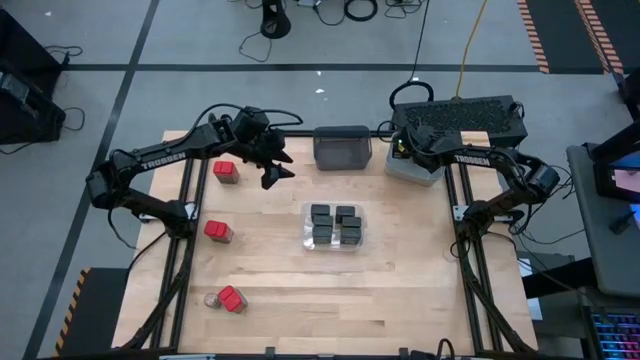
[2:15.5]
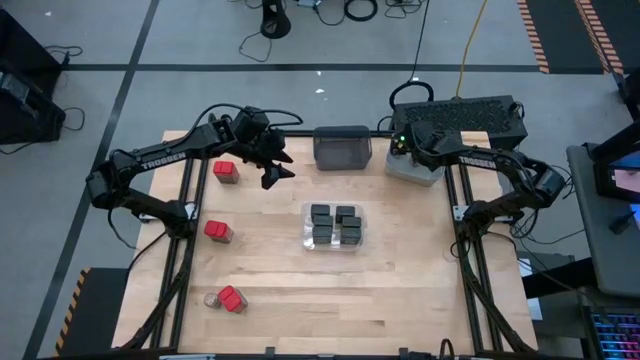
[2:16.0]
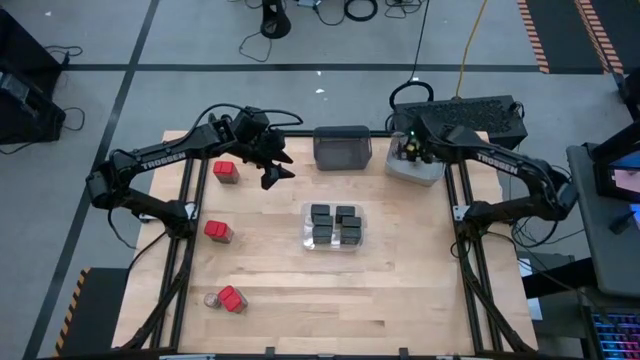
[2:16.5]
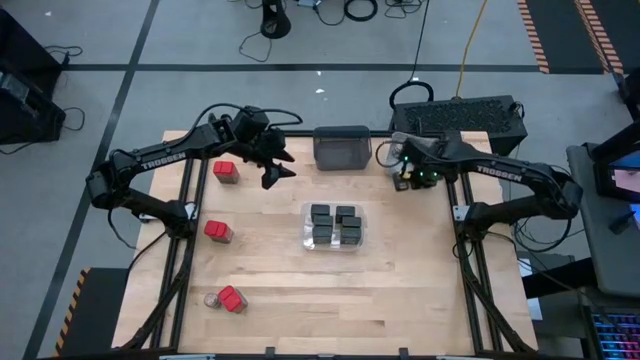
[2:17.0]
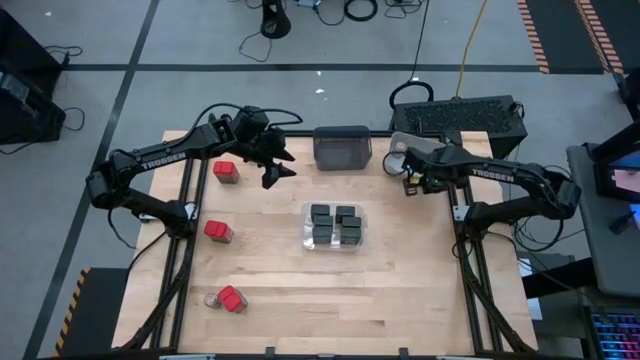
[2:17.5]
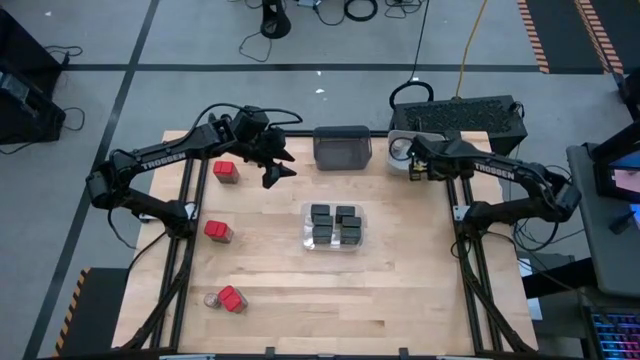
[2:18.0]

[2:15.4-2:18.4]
Task: Sort spices by type
Adjust the gray bin

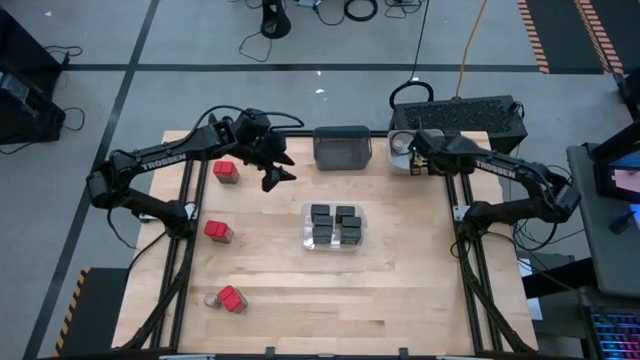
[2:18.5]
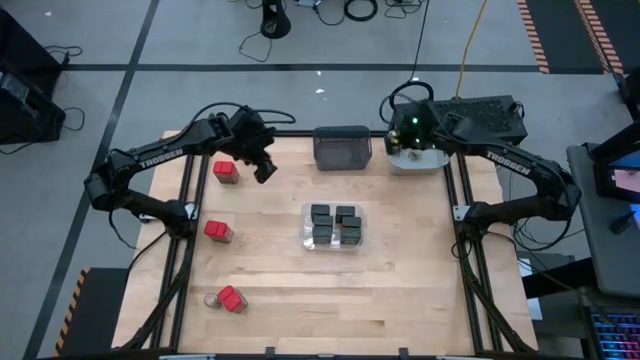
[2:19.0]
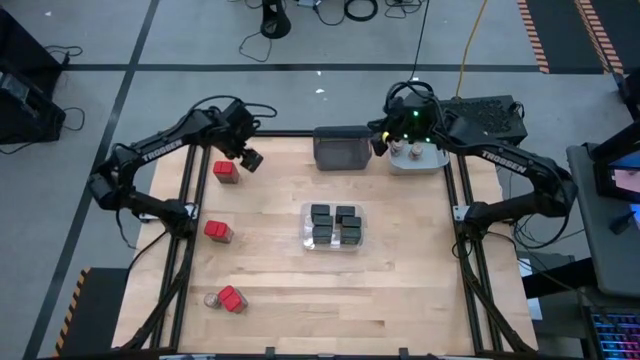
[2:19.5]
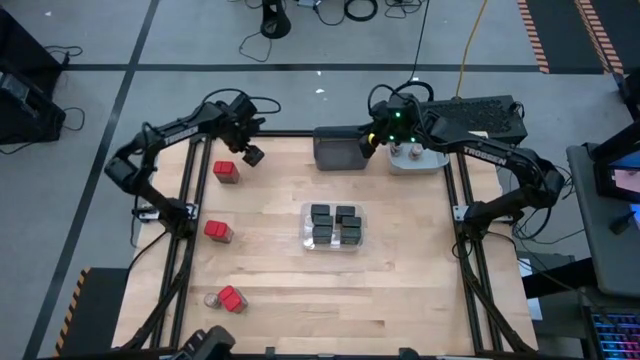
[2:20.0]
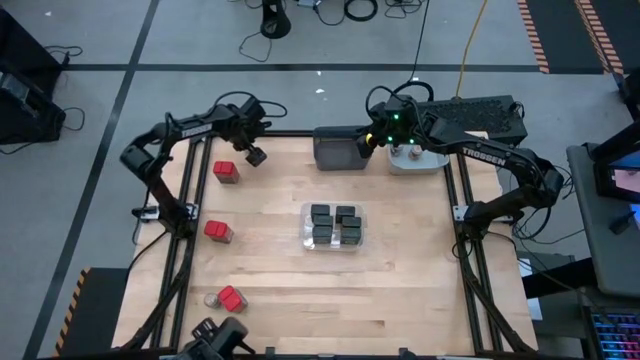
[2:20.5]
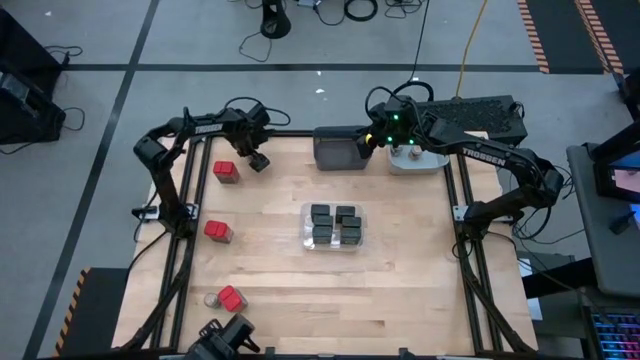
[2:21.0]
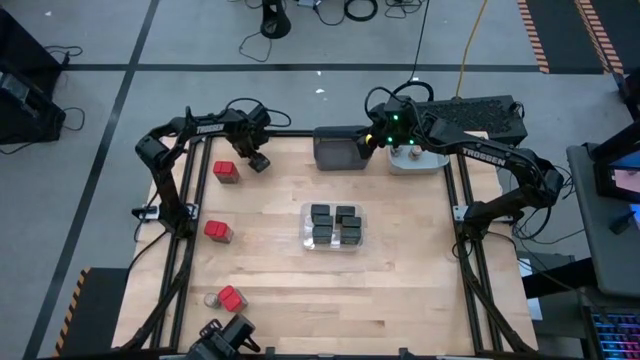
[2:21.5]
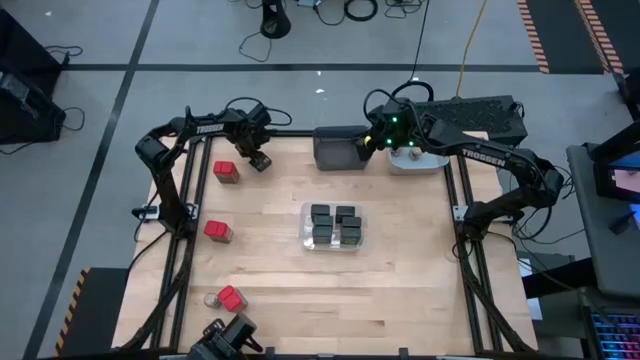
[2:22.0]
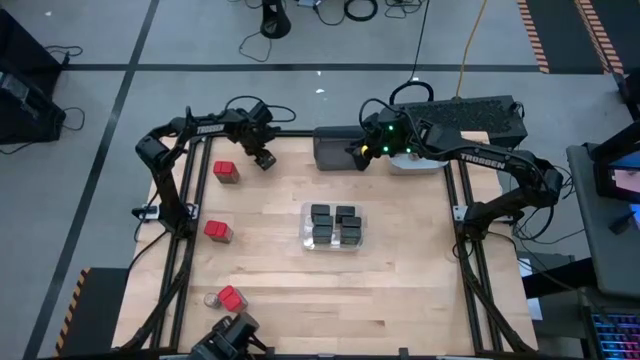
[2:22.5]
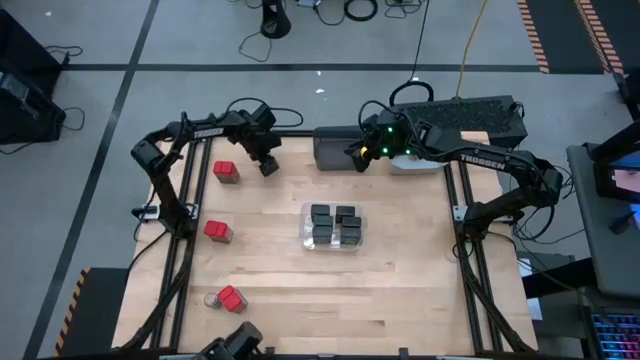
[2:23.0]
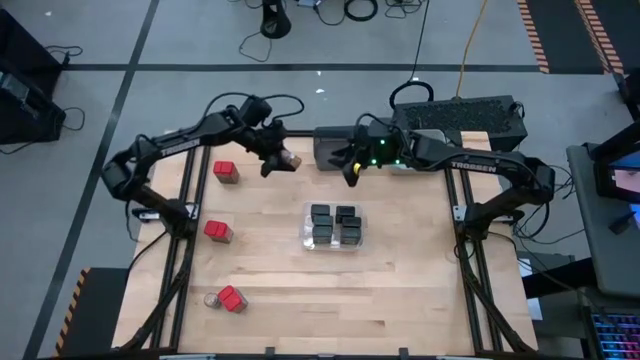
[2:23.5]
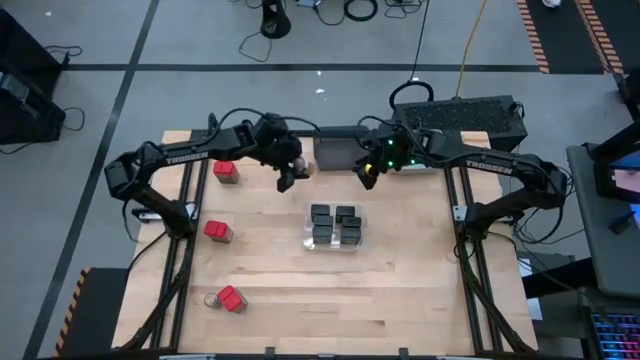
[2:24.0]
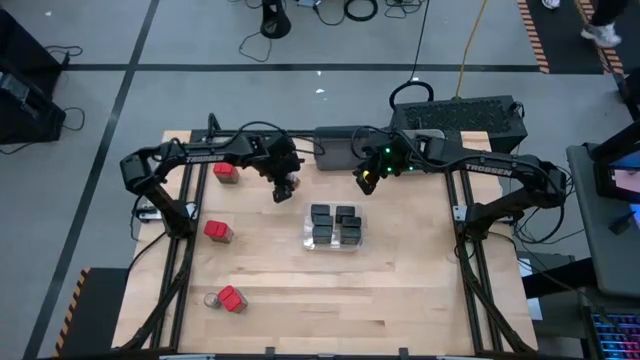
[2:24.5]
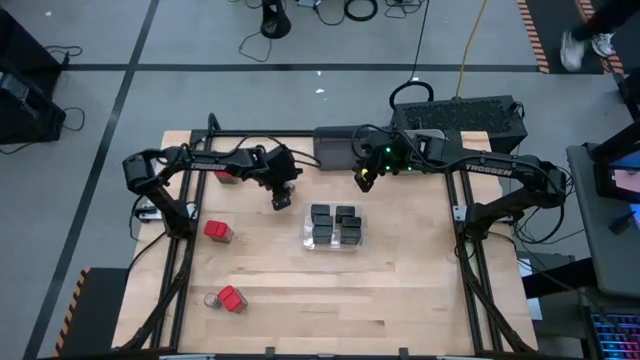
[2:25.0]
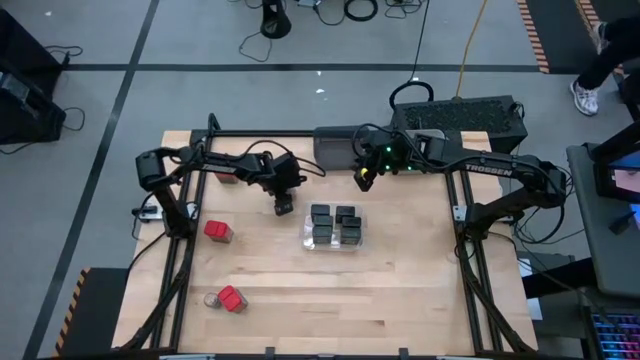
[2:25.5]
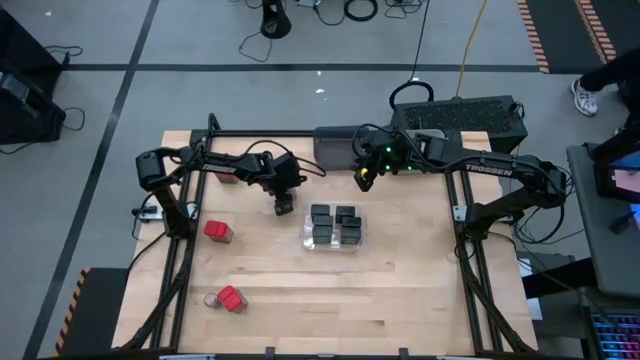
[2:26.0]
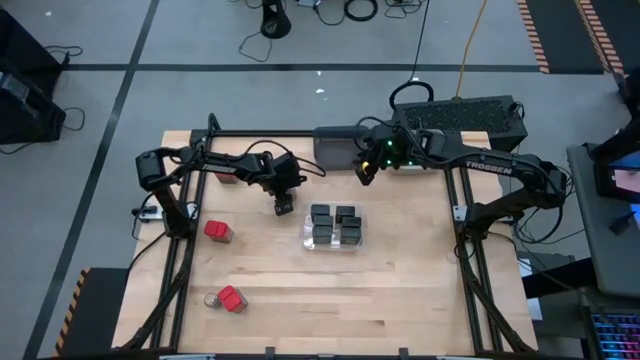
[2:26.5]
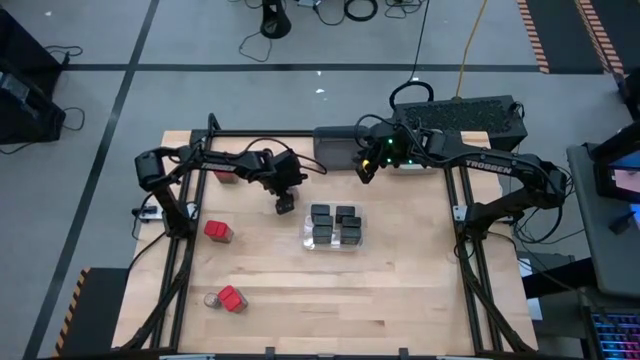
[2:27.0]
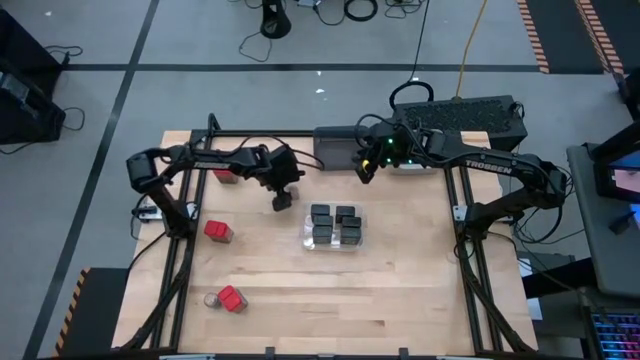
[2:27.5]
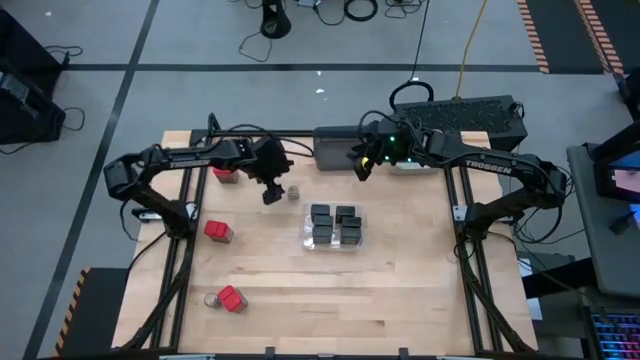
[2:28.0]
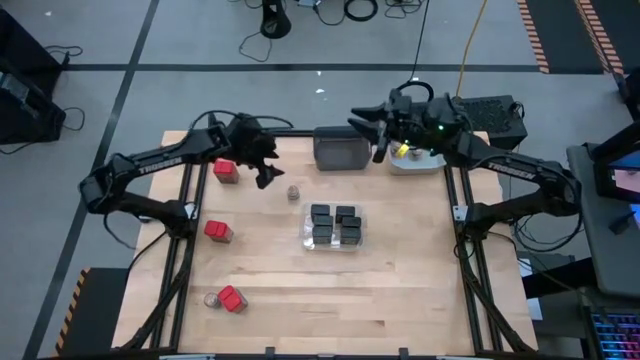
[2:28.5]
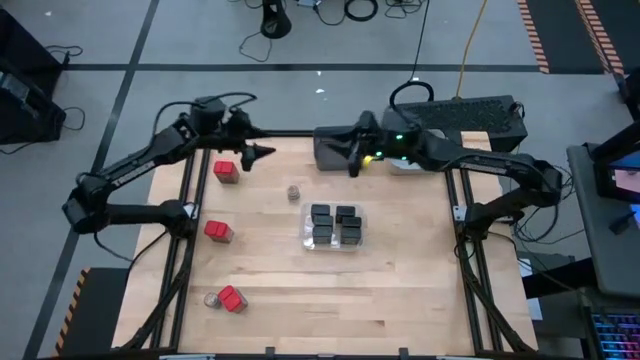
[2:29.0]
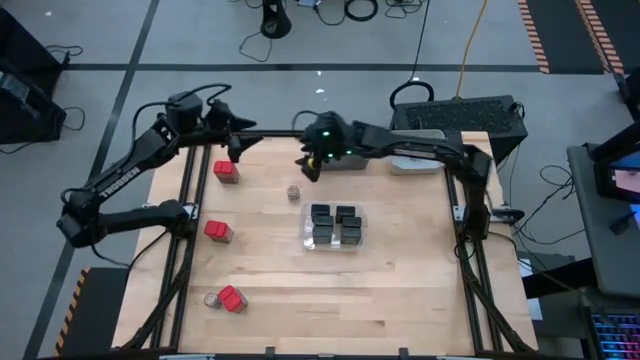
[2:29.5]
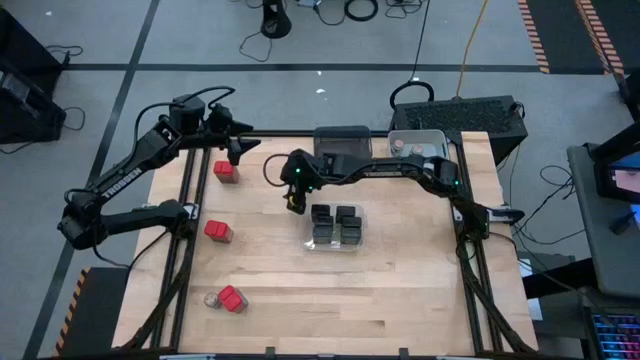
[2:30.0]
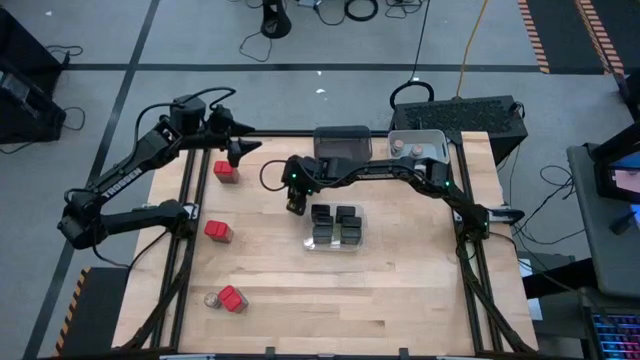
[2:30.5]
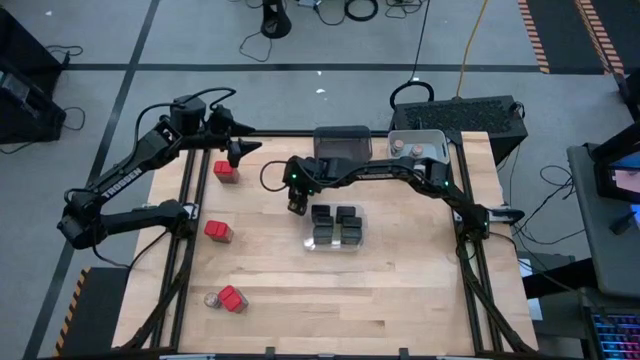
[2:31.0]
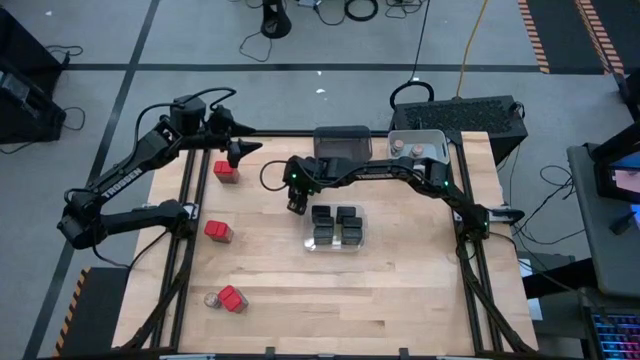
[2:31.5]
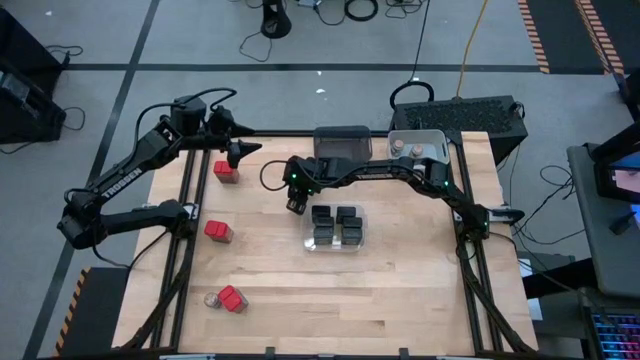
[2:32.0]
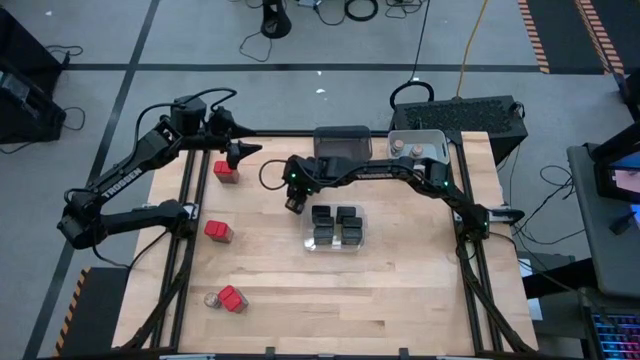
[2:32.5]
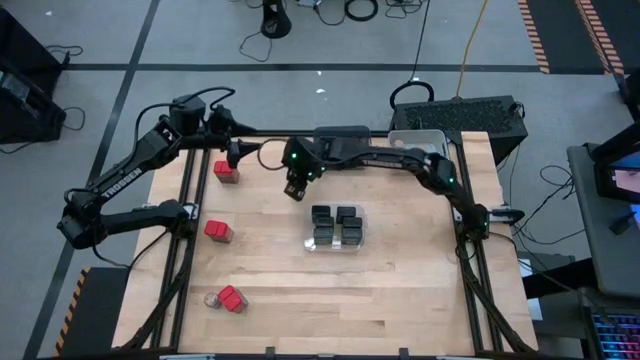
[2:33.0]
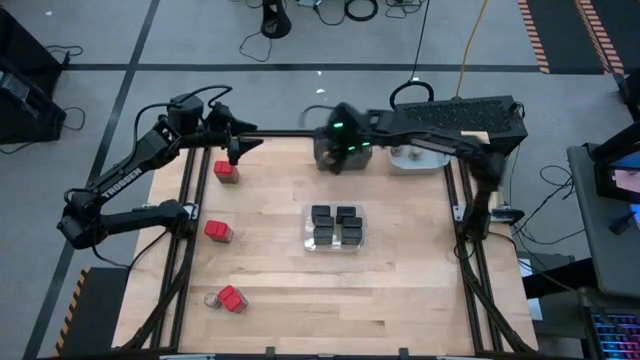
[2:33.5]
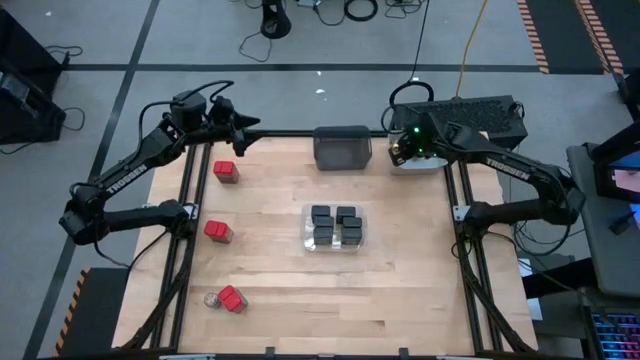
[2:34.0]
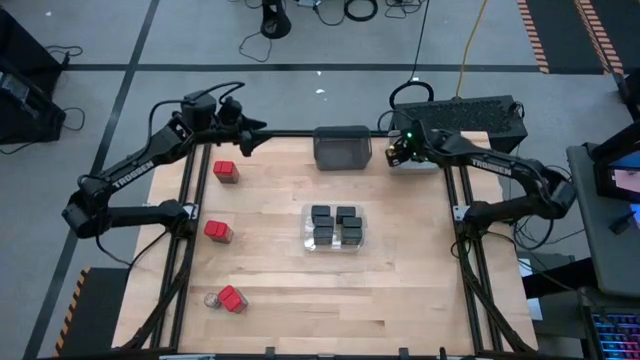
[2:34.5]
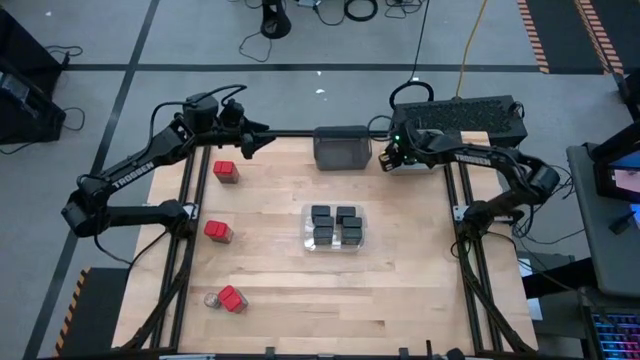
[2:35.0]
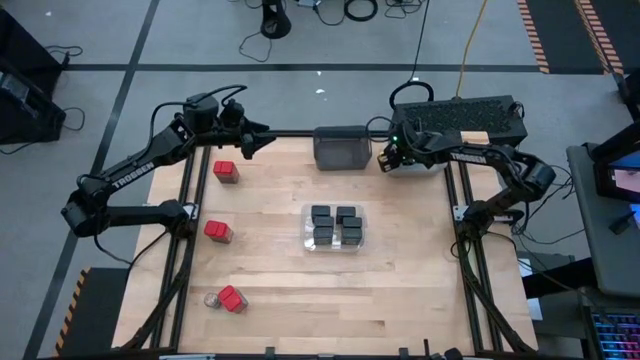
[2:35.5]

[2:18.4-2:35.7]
Put the brown seasoning into the gray bin

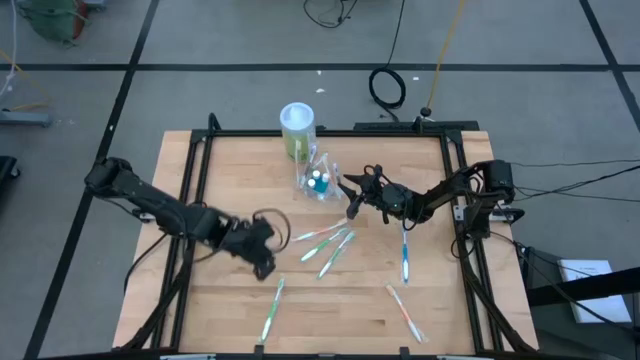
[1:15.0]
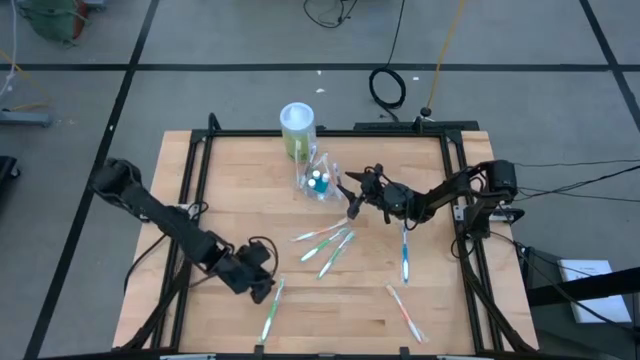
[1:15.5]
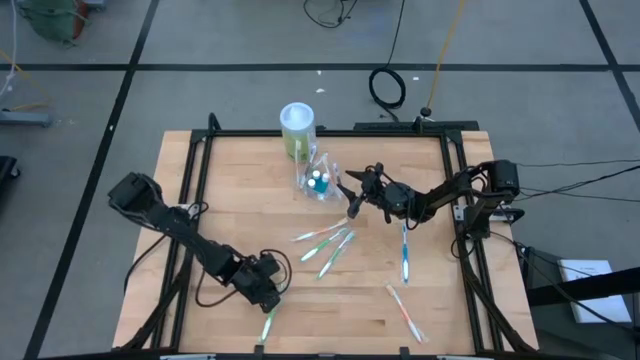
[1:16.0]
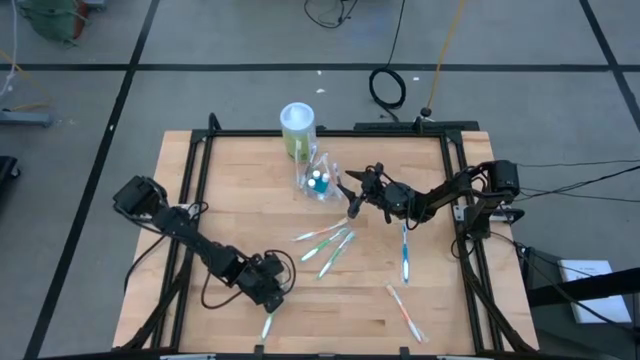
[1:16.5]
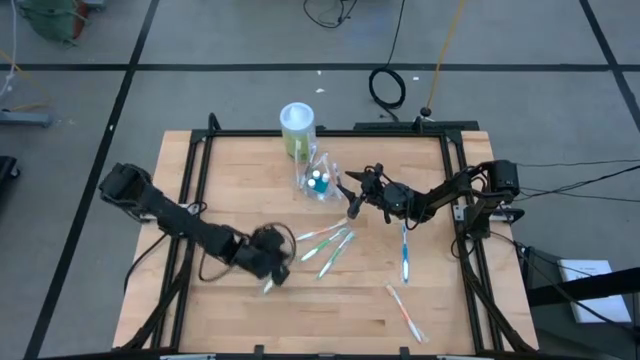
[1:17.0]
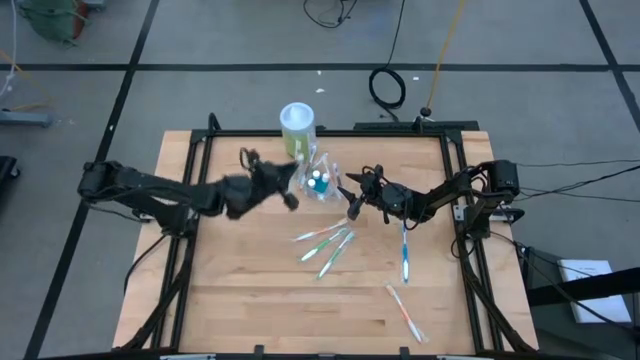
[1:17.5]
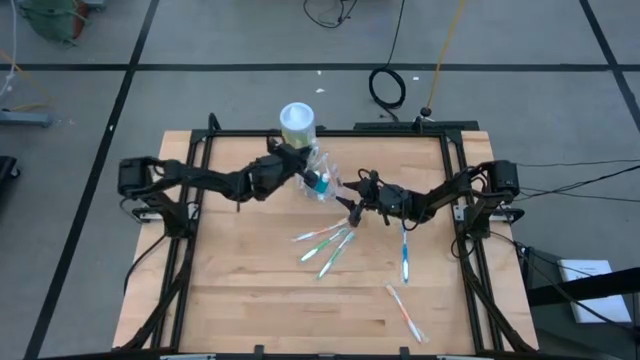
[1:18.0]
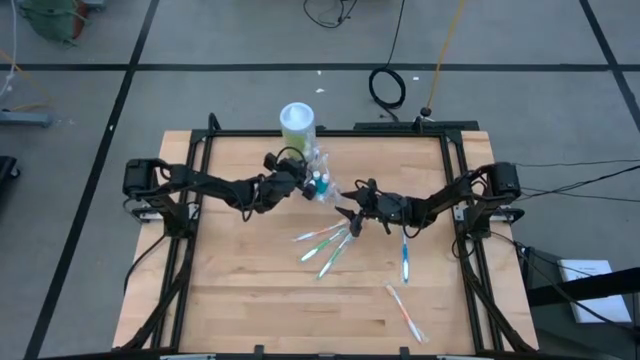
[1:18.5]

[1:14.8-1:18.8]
Task: Pick & Place toothbrushing station
Put the green toothbrush into the left of the transparent organizer
